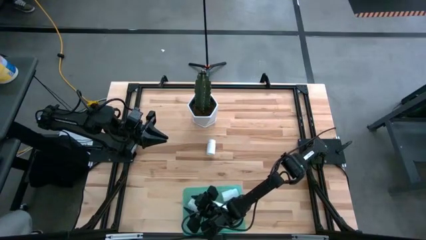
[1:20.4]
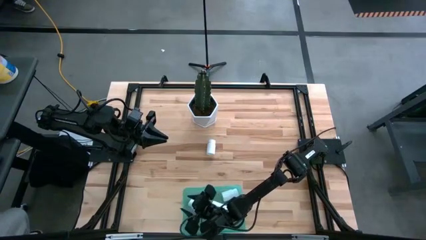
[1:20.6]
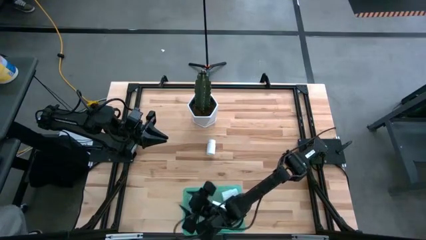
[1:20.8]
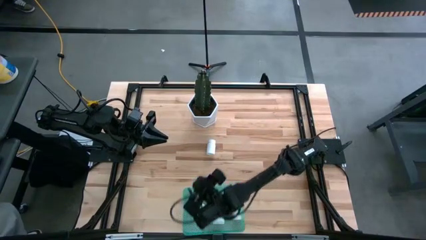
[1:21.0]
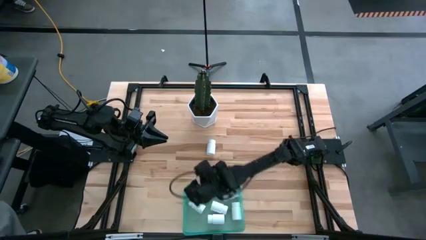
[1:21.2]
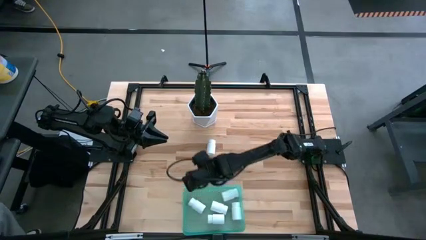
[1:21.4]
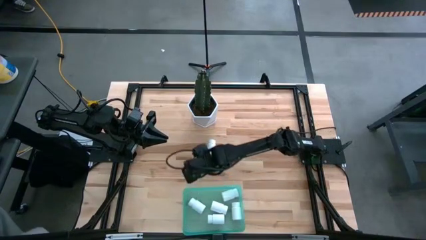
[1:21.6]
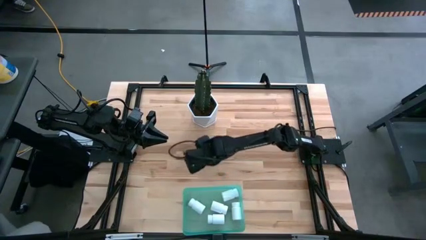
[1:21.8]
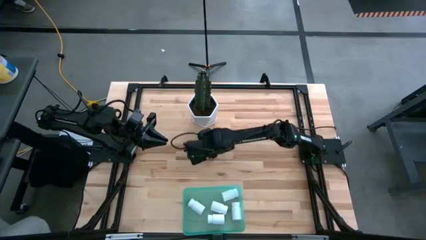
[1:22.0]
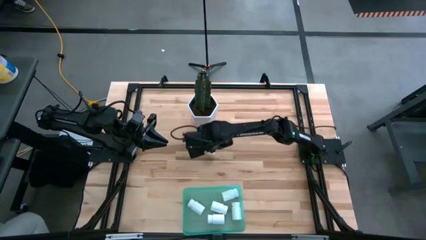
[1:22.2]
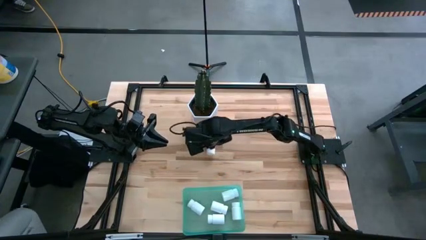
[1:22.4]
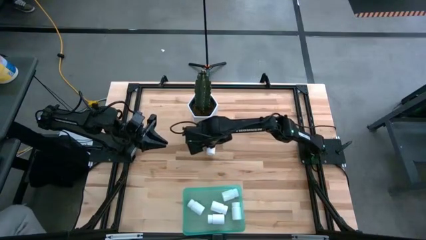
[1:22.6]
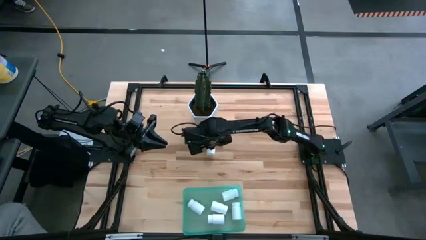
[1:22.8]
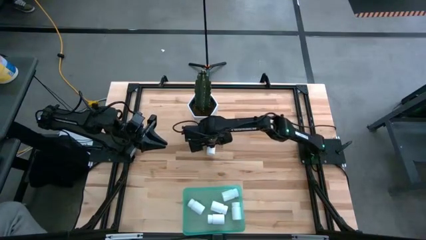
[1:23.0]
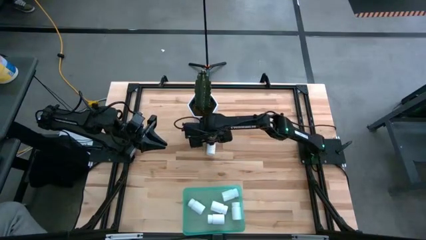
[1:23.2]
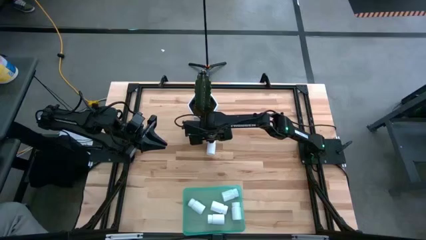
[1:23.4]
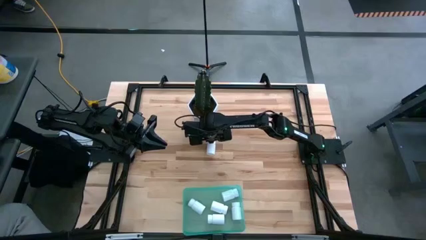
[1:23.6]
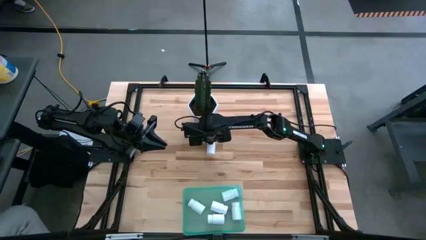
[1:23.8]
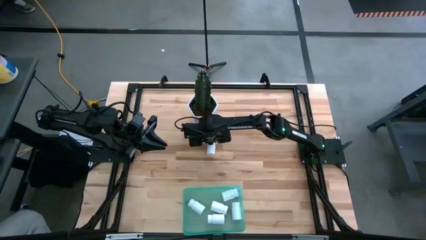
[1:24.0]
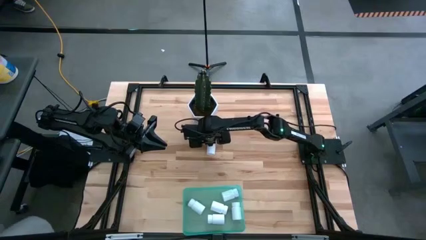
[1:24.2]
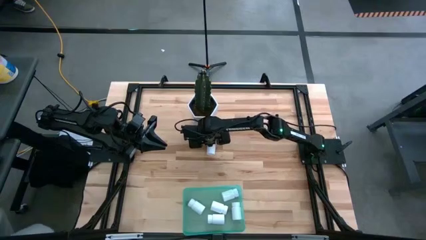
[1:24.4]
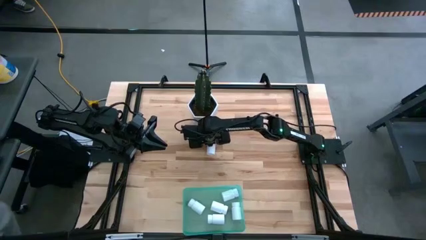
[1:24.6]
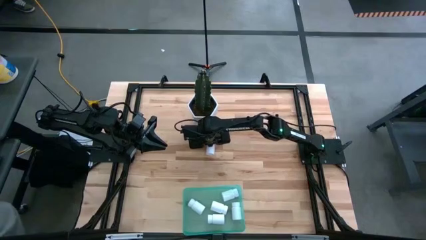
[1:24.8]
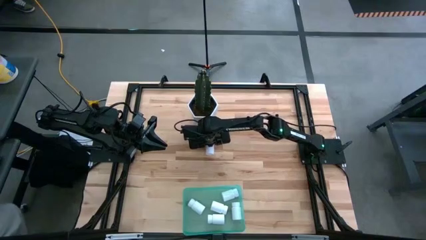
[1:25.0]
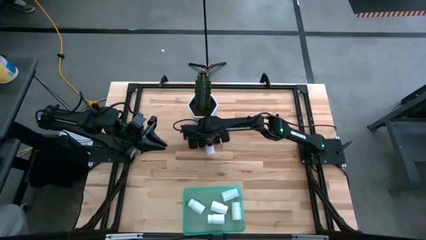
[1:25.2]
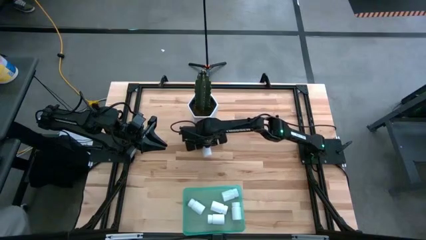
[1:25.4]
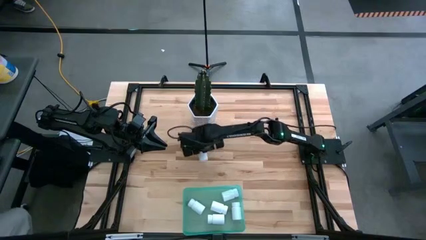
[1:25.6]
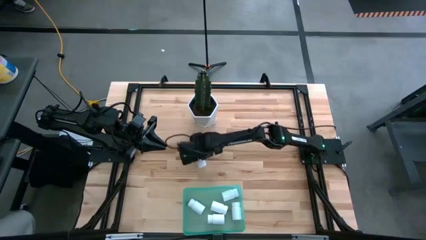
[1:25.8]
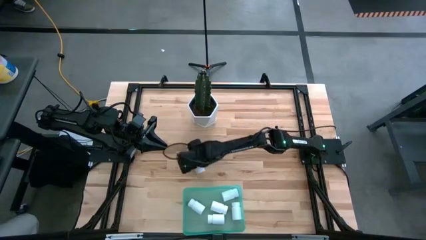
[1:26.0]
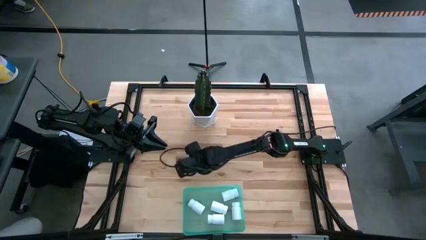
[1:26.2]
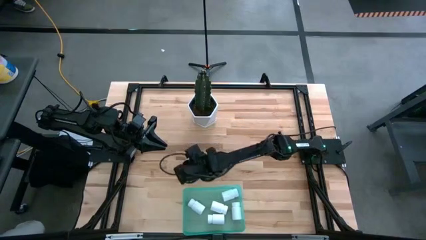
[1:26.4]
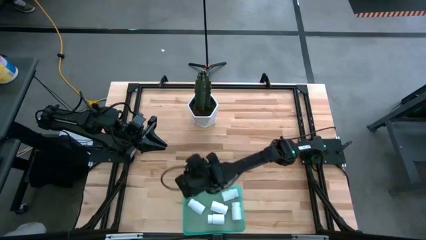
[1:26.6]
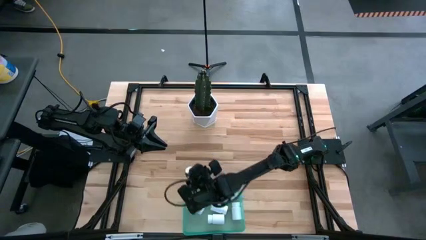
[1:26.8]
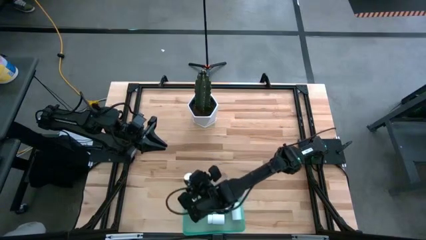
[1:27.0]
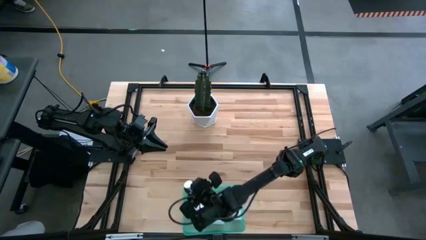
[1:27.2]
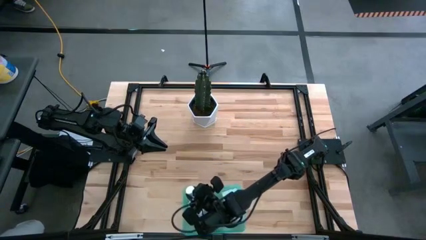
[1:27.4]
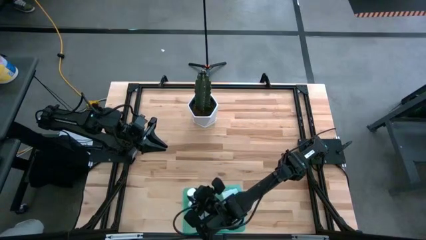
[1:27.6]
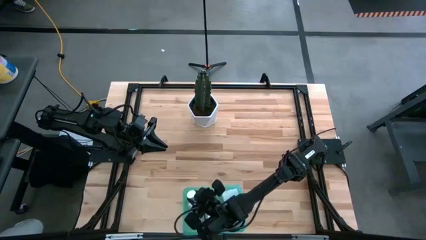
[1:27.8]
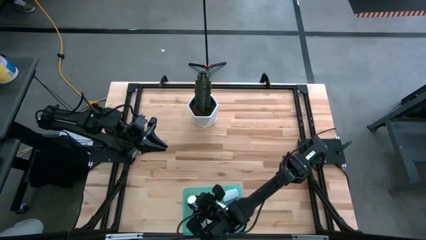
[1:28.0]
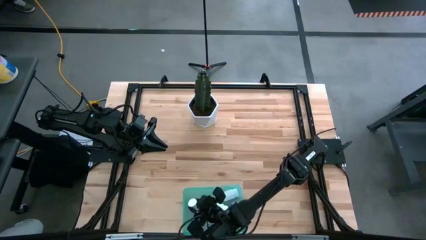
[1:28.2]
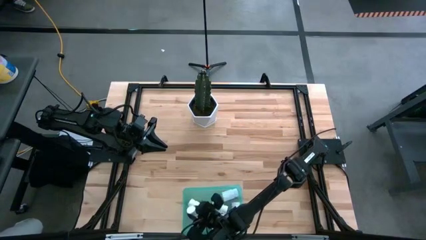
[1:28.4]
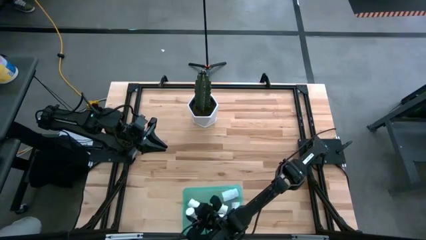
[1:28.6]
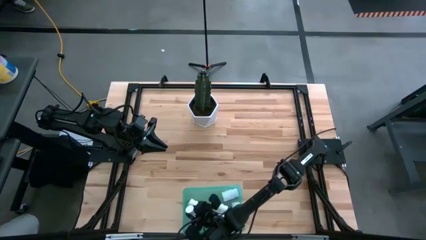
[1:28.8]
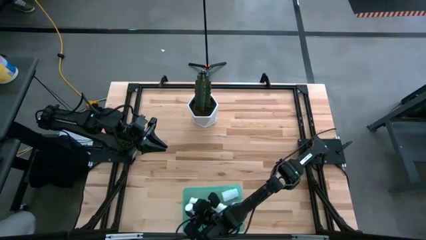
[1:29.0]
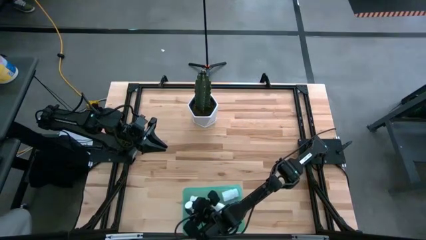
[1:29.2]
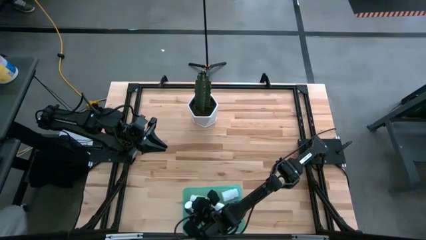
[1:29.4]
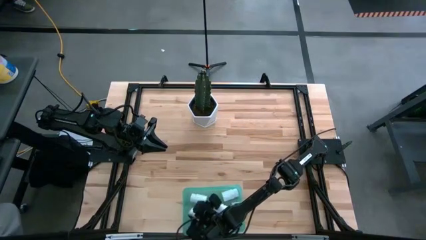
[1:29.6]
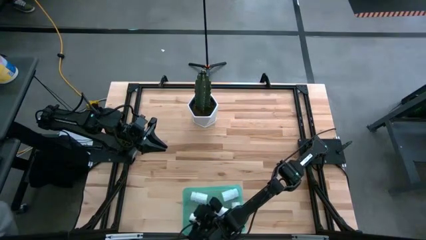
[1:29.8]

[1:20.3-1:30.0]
Task: Pick and place pill bottles into a basket
Put the white pill bottle into the bin

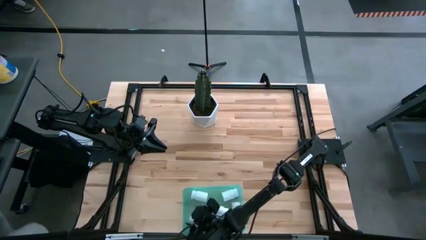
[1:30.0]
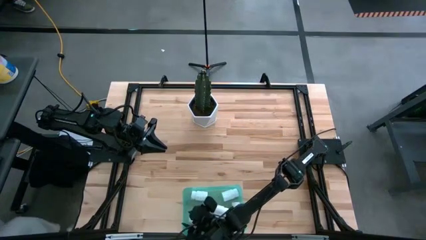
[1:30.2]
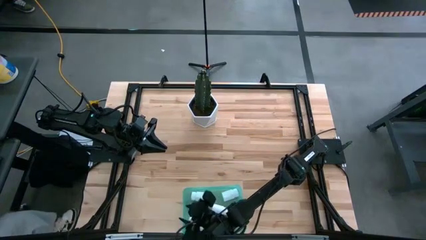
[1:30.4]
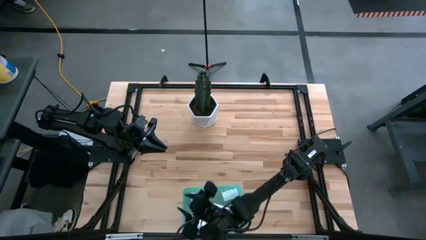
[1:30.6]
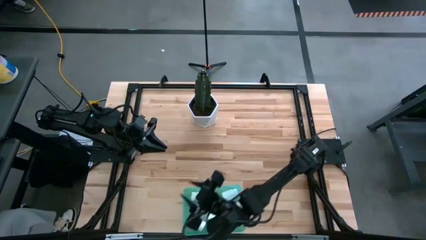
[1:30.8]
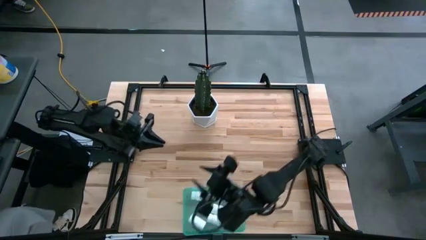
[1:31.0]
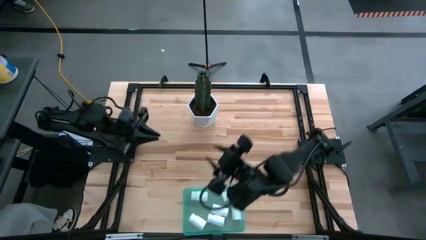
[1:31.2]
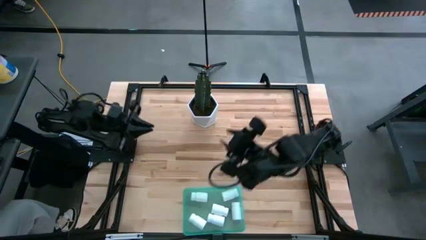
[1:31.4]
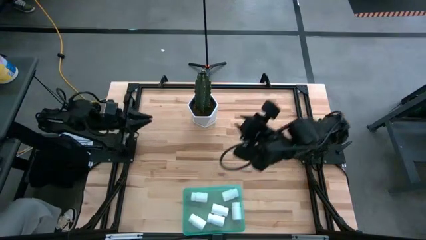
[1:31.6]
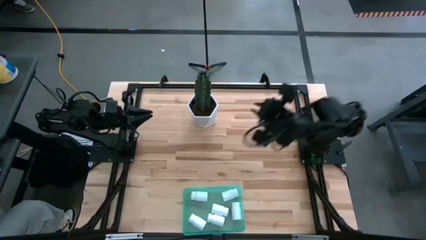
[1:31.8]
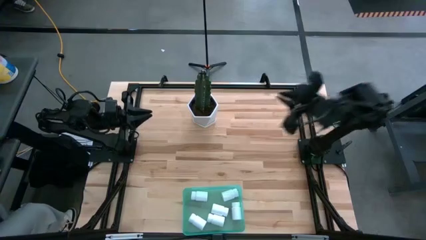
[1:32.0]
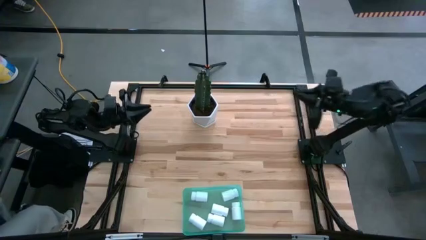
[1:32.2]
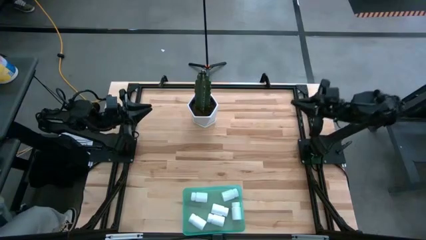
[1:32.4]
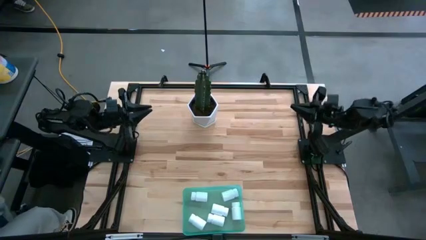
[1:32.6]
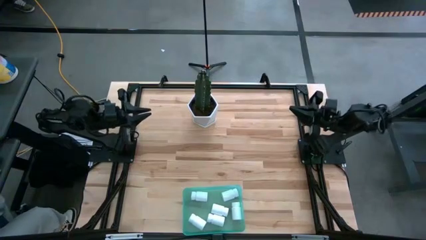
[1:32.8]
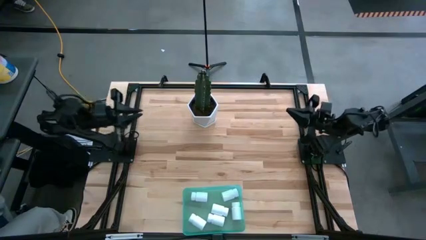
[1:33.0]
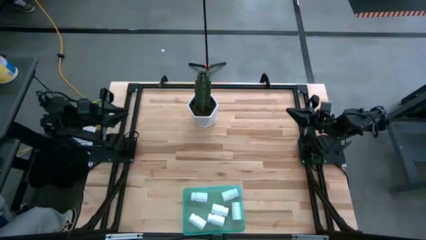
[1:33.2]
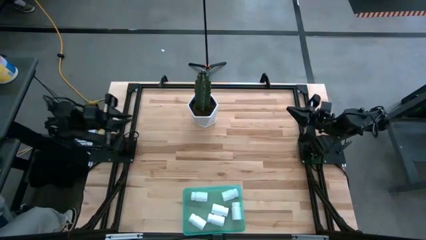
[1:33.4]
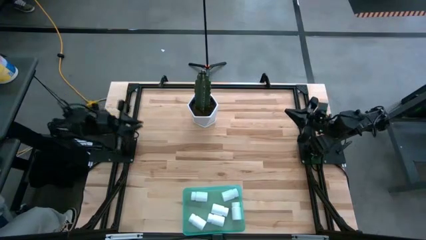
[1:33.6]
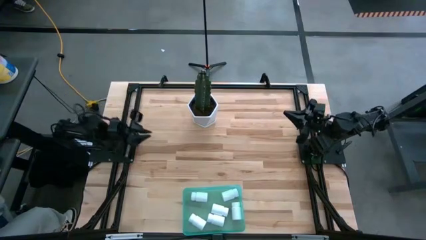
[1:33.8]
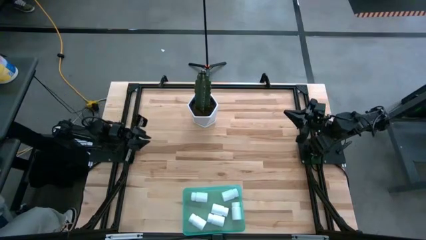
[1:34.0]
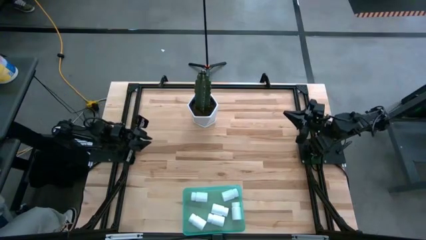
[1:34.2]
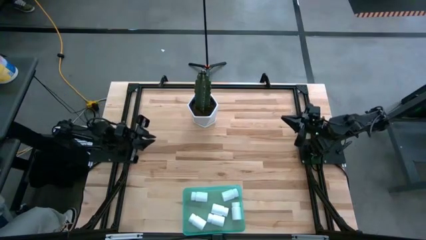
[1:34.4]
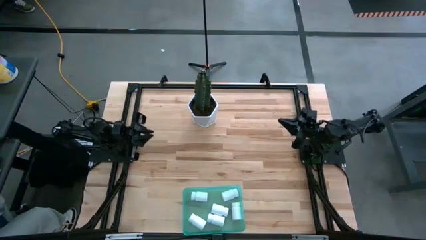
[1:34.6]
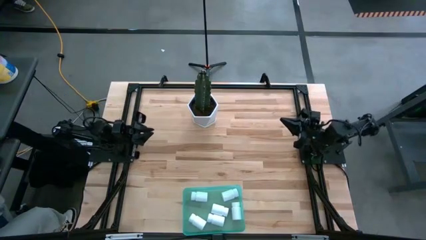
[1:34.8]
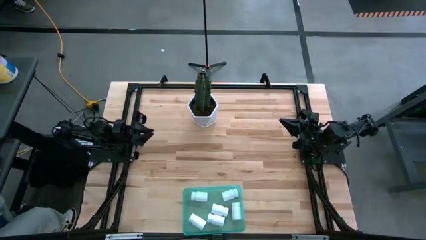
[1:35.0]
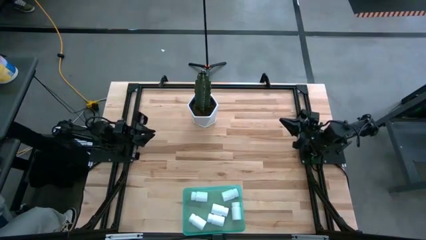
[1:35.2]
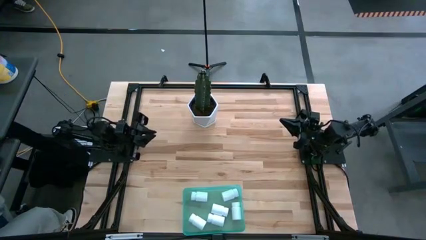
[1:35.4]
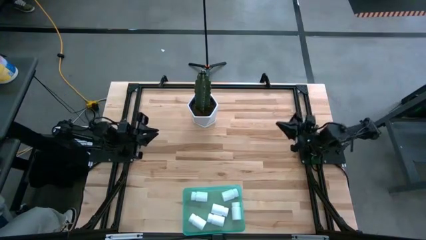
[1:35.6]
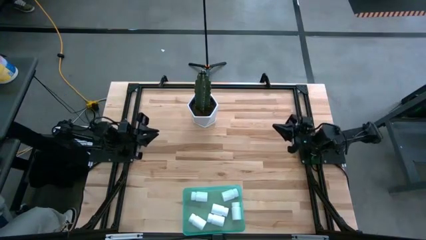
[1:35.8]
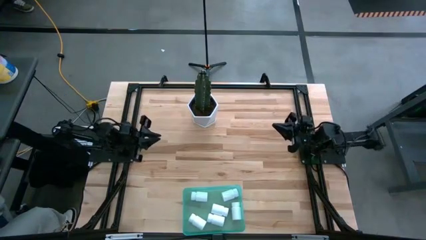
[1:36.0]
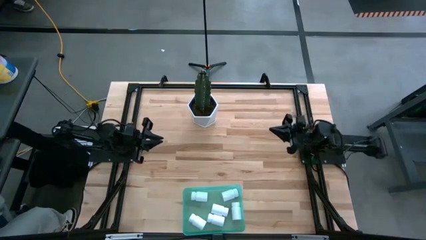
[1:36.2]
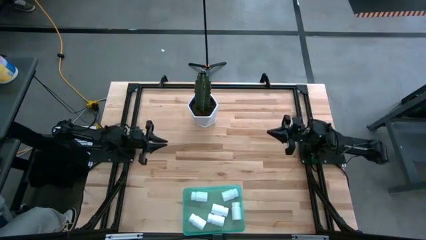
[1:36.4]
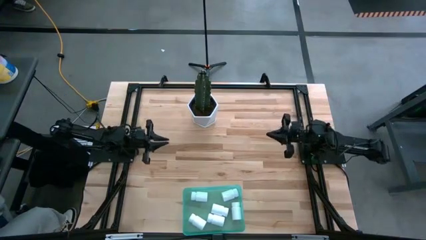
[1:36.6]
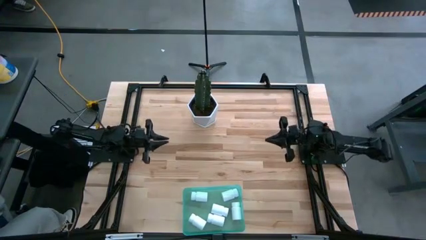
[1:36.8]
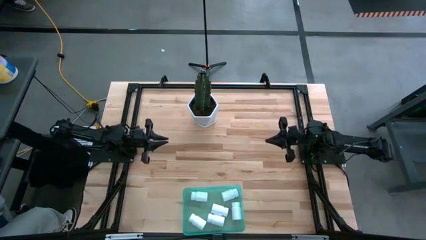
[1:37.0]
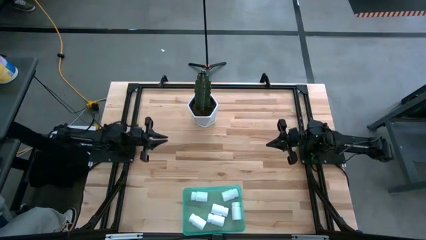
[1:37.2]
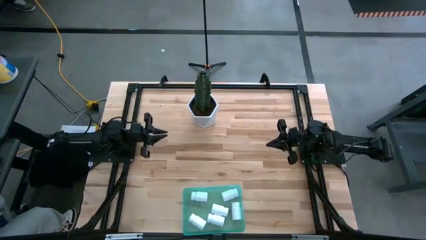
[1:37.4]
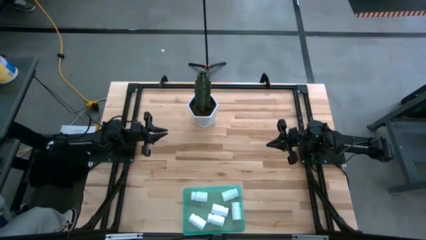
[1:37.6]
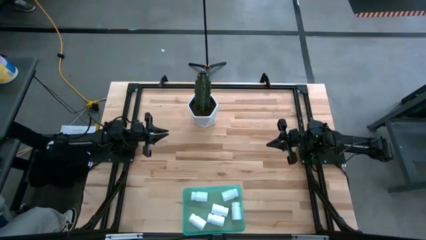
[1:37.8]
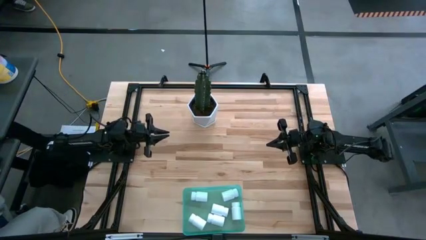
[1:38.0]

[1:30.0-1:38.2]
Return to Home Position
